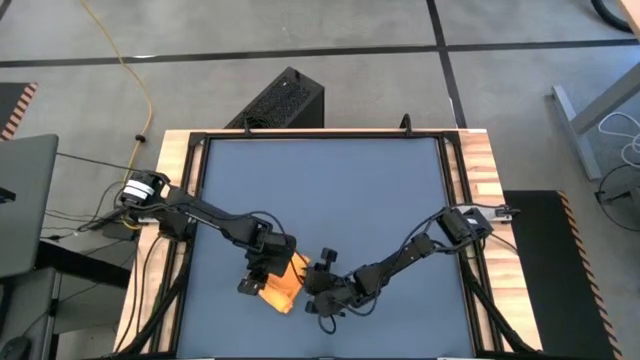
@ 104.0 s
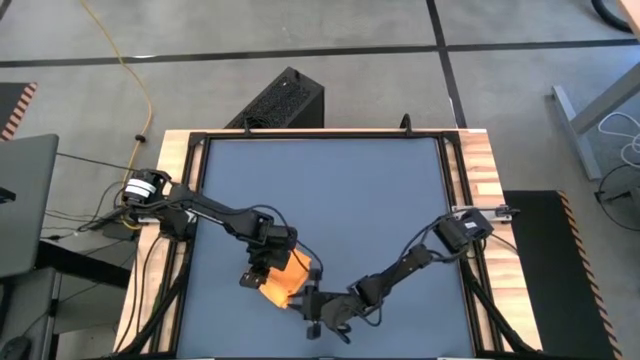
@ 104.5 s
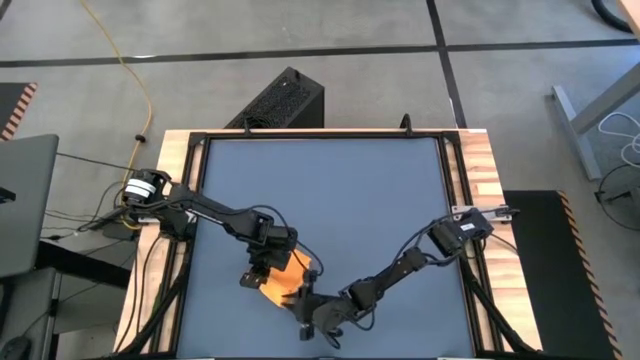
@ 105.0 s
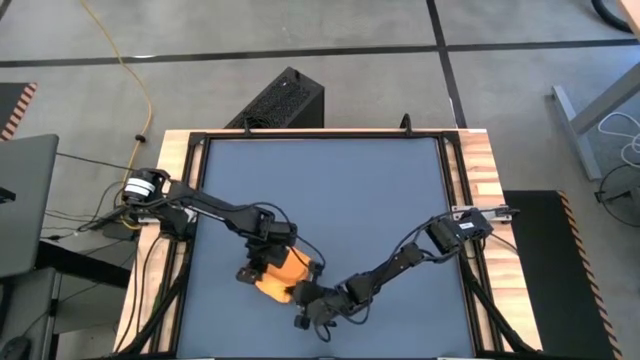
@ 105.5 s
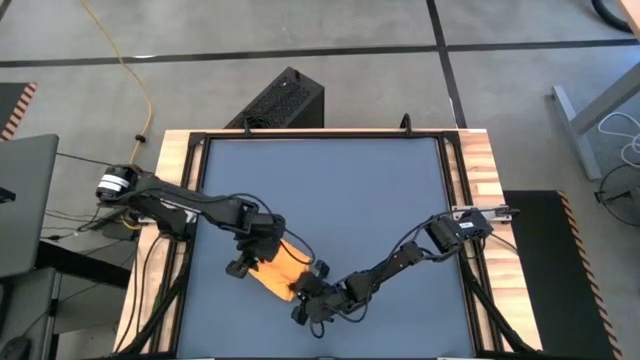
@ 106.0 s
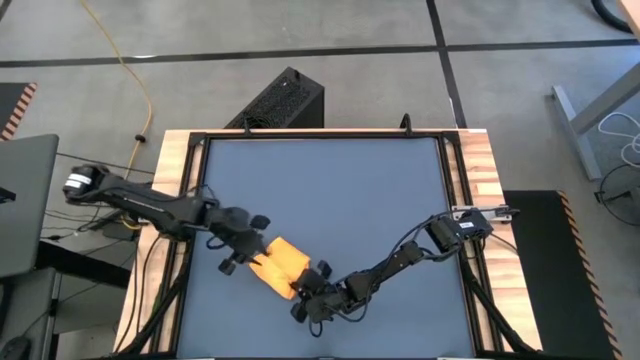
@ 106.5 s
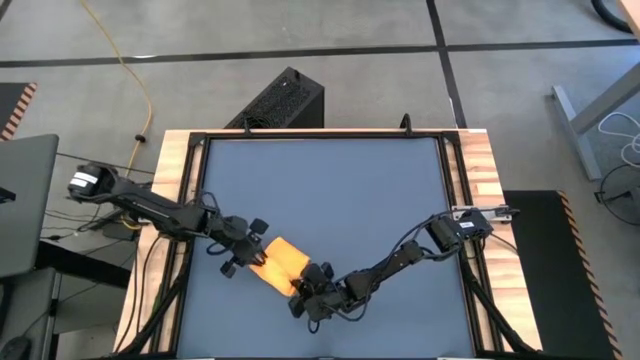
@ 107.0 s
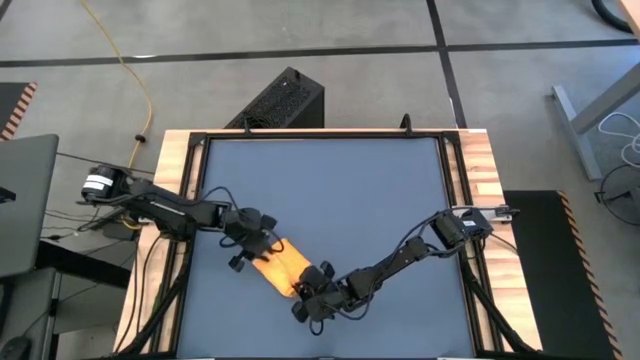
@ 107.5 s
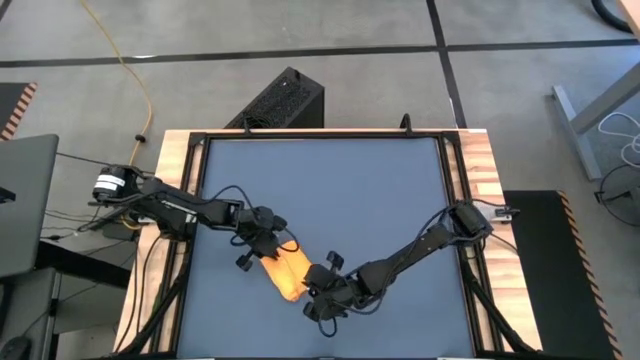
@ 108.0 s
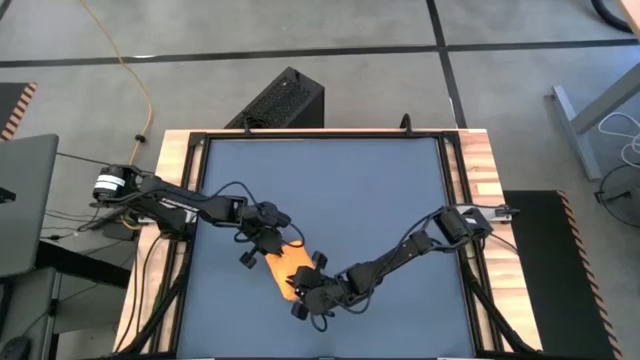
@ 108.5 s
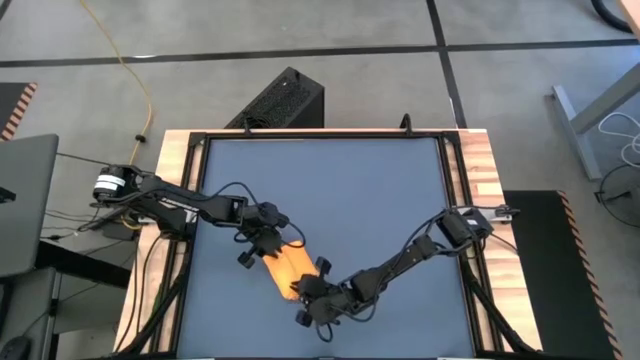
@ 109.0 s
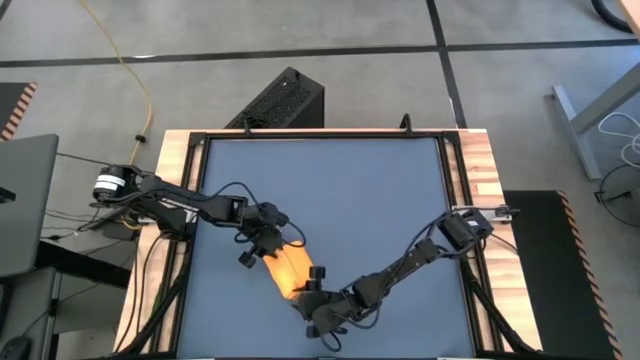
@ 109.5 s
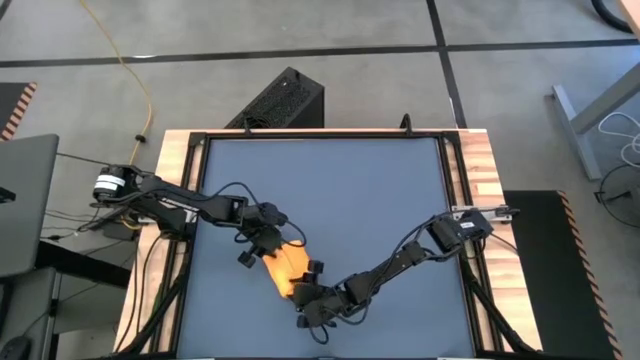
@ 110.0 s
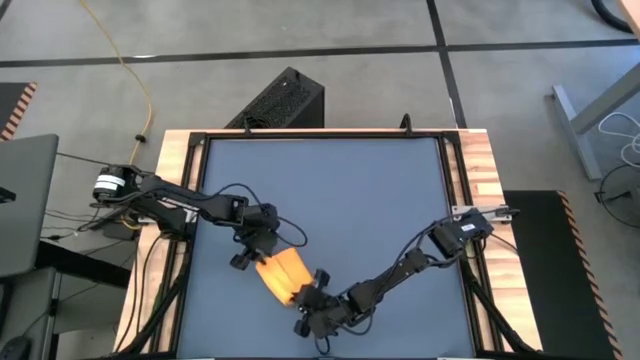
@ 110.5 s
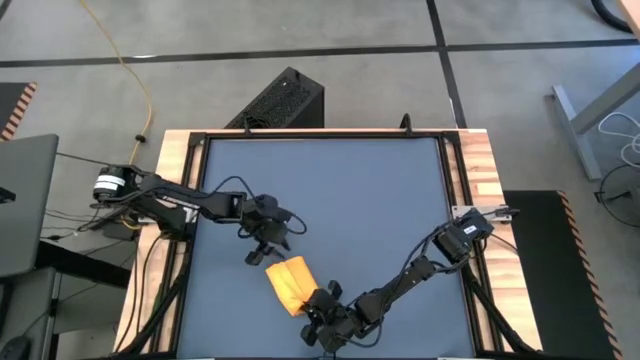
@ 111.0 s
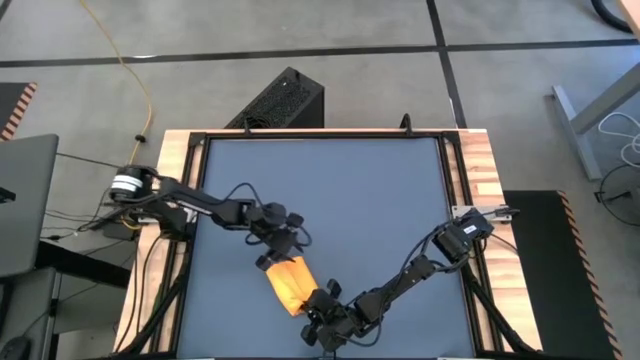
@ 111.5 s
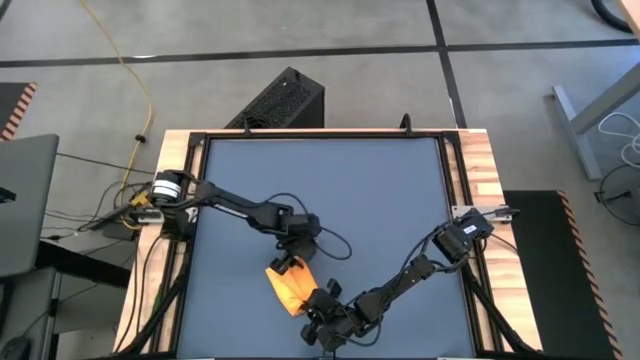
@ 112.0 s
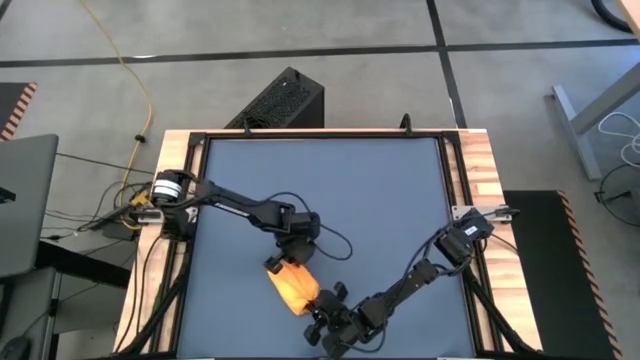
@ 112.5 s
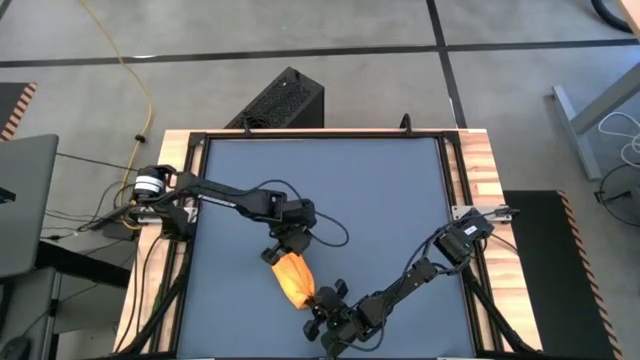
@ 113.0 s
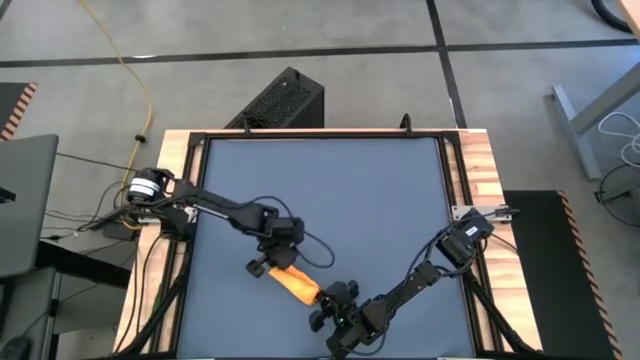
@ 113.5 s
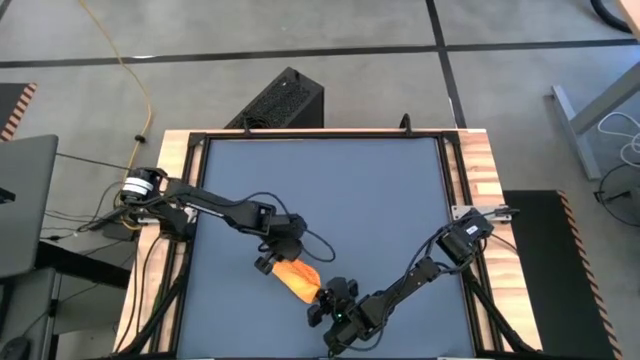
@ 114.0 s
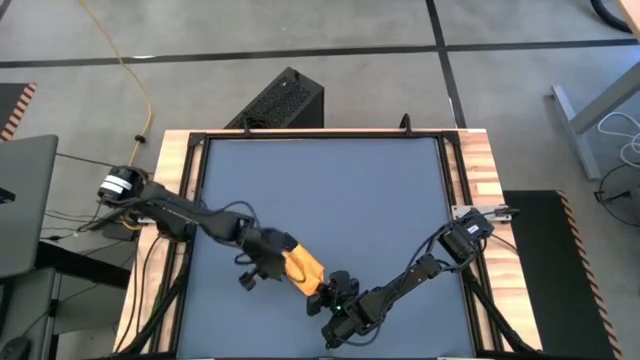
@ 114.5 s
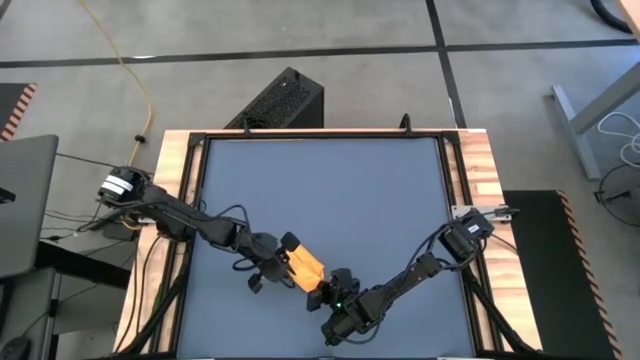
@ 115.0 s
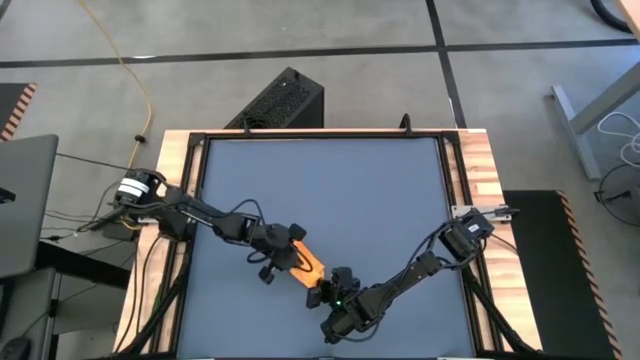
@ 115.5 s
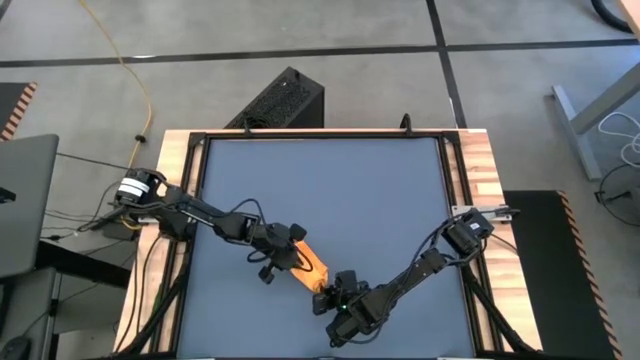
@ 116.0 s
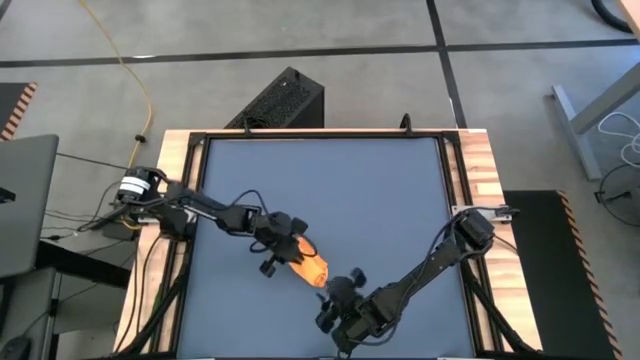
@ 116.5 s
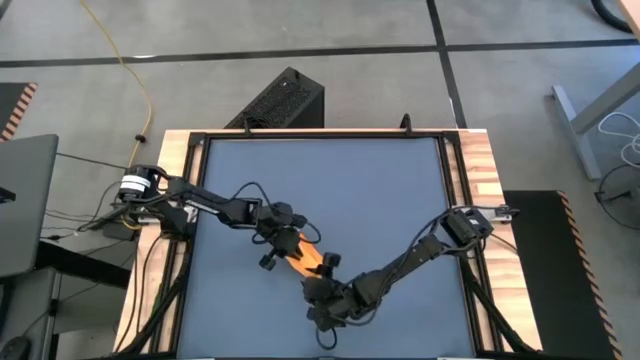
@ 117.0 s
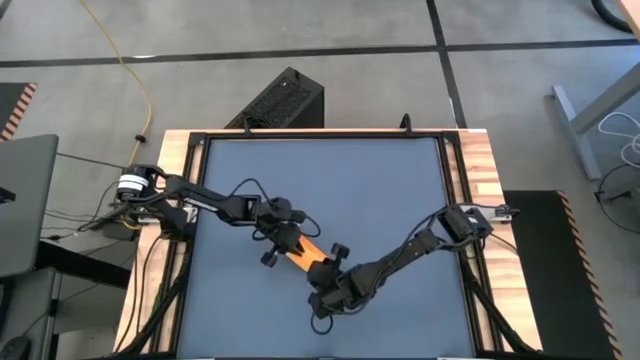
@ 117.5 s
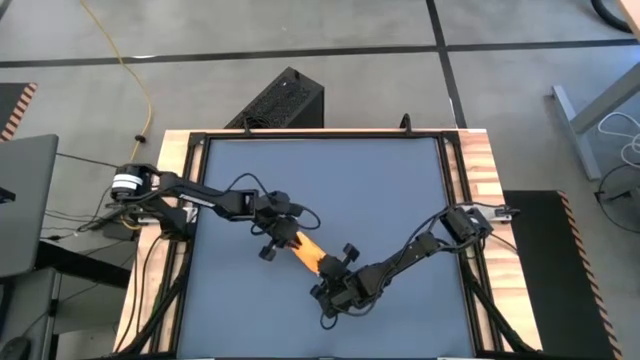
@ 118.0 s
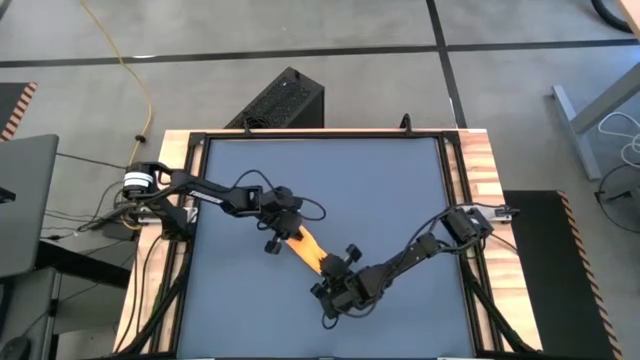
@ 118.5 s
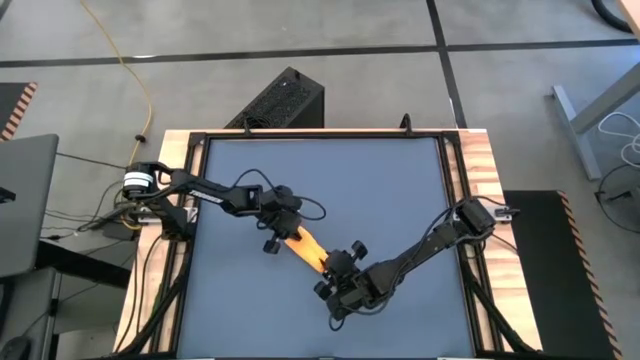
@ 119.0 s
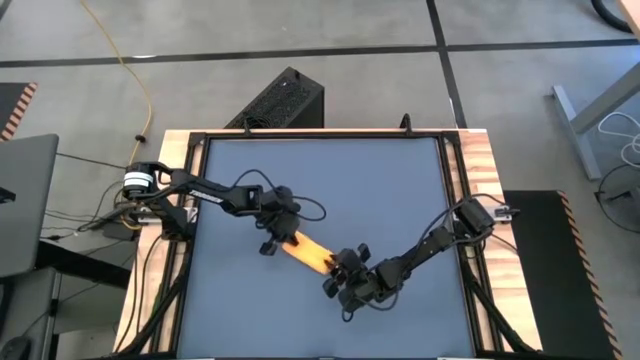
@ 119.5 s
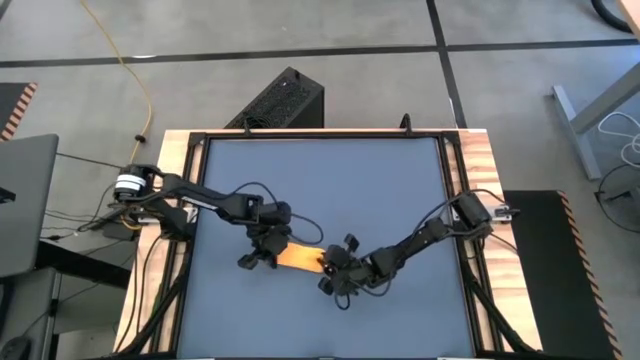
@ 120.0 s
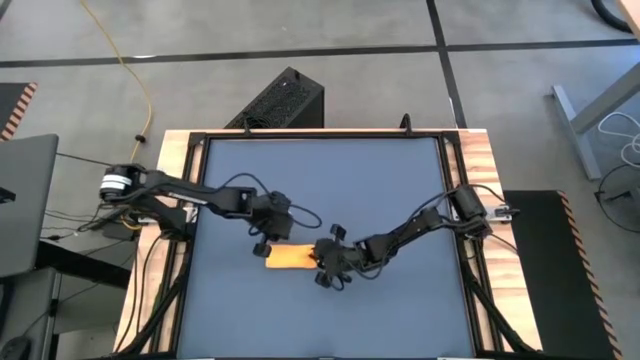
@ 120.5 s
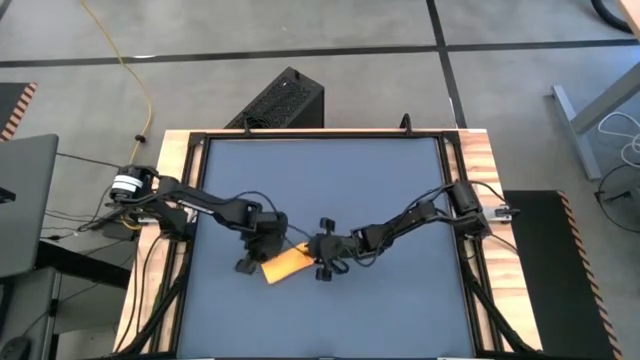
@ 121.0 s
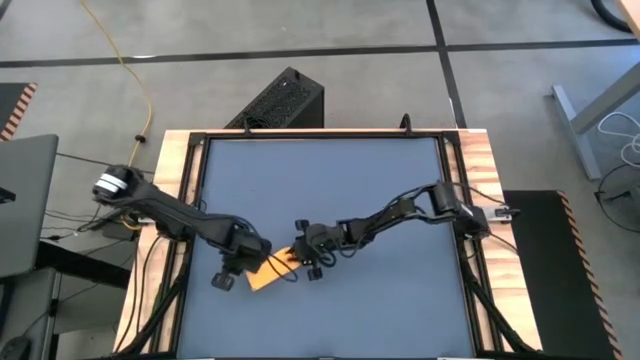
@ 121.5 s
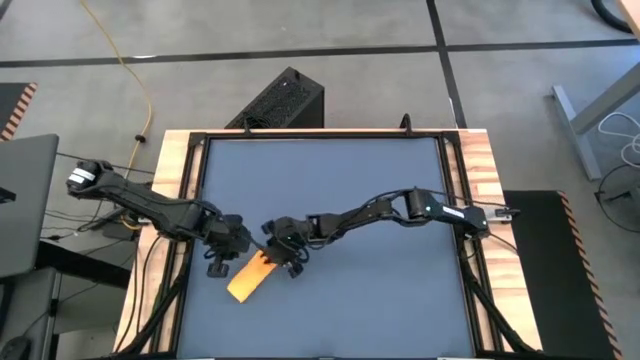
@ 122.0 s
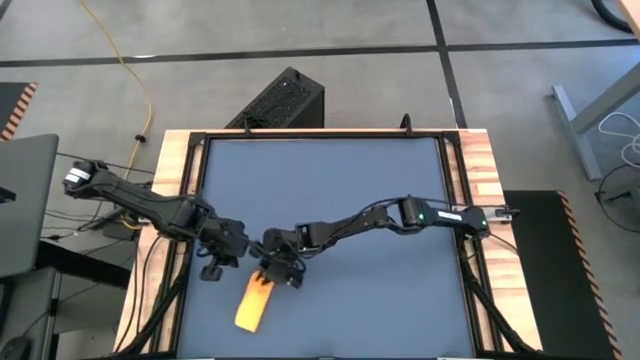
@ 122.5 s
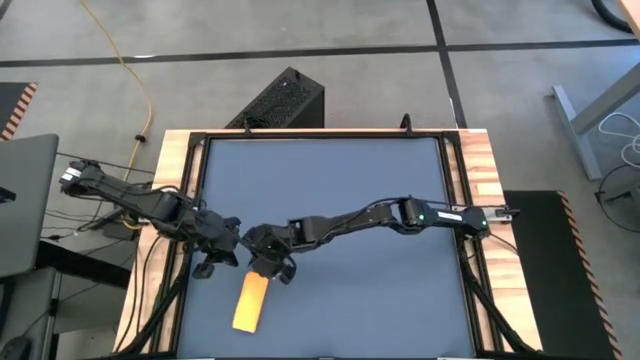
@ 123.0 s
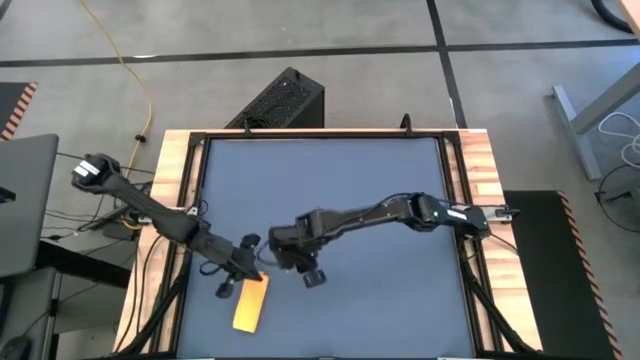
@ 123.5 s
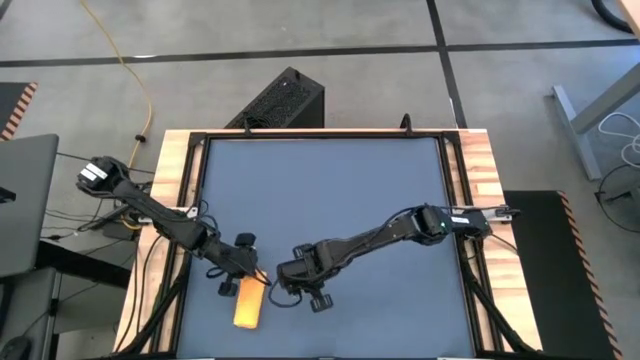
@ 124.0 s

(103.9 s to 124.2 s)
Task: Roll towel
Roll the yellow microfiber cloth on the table
